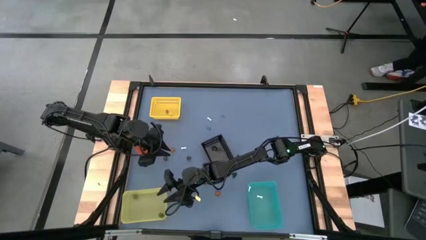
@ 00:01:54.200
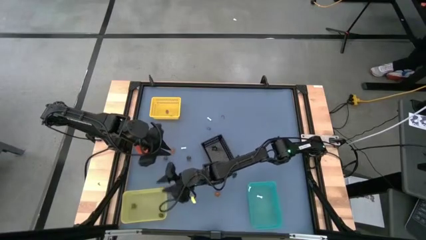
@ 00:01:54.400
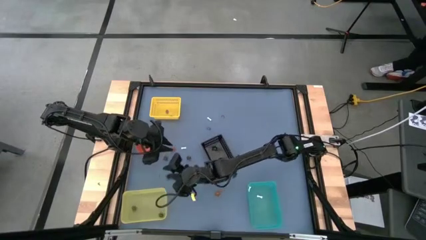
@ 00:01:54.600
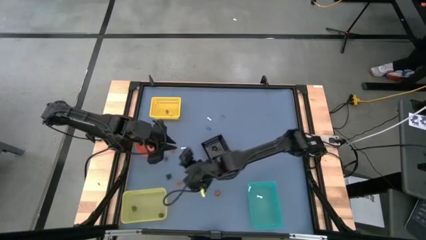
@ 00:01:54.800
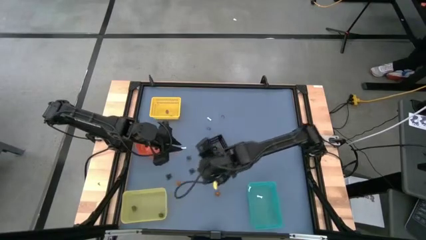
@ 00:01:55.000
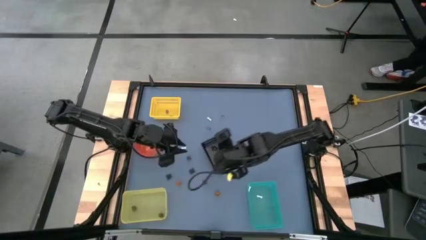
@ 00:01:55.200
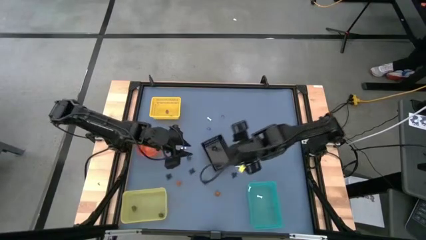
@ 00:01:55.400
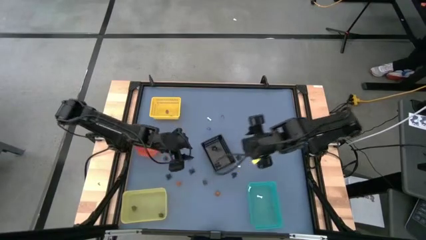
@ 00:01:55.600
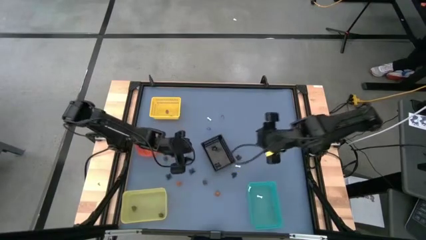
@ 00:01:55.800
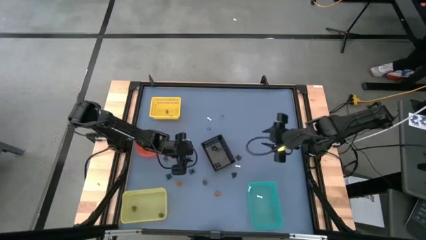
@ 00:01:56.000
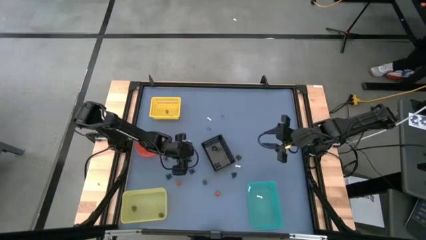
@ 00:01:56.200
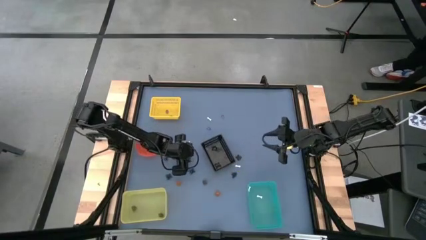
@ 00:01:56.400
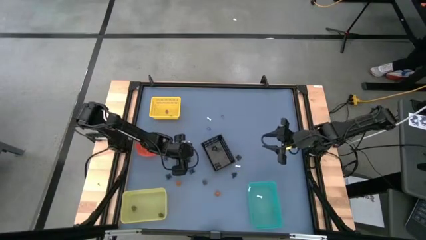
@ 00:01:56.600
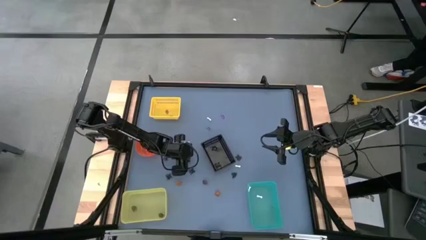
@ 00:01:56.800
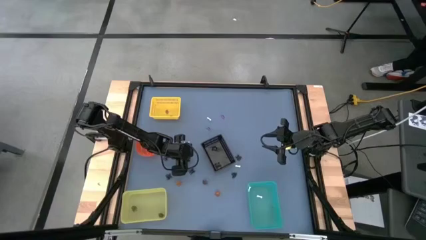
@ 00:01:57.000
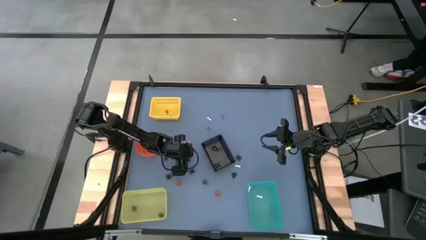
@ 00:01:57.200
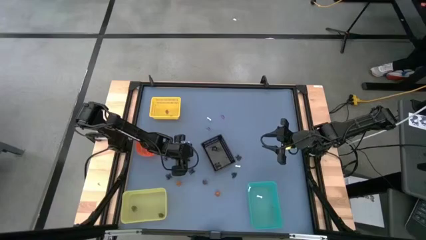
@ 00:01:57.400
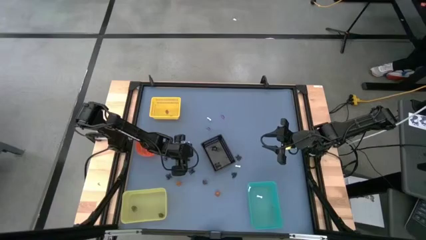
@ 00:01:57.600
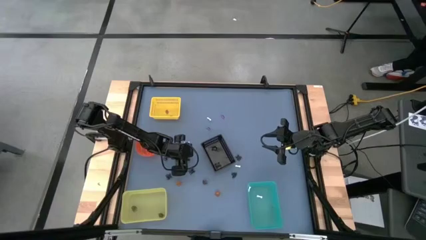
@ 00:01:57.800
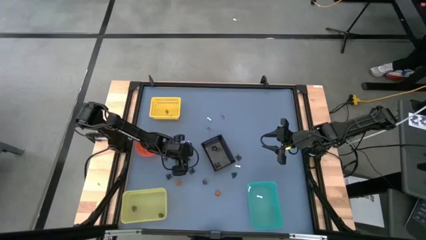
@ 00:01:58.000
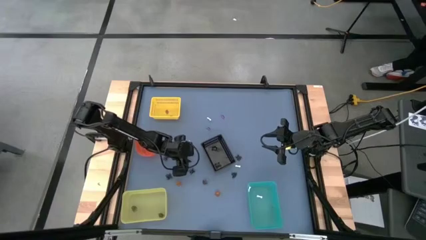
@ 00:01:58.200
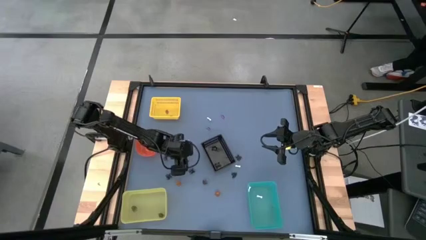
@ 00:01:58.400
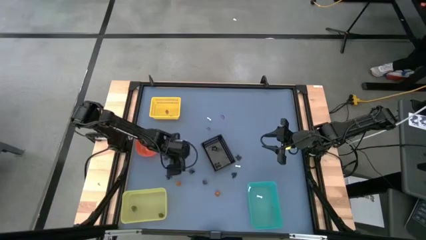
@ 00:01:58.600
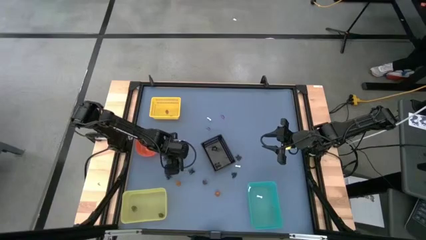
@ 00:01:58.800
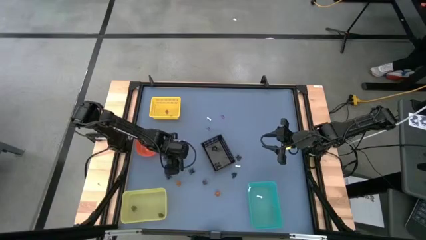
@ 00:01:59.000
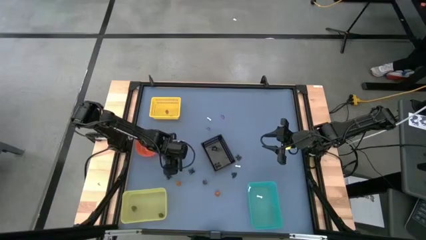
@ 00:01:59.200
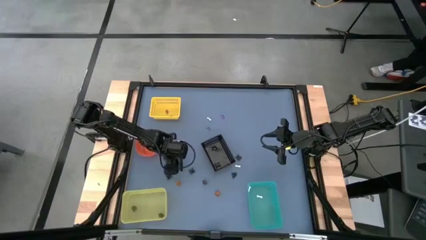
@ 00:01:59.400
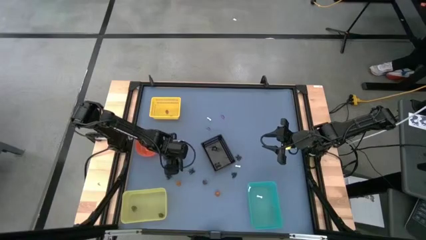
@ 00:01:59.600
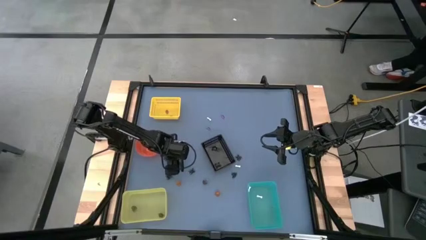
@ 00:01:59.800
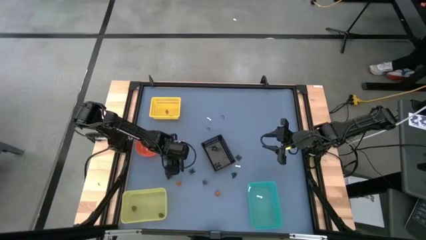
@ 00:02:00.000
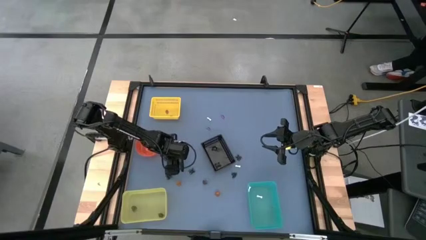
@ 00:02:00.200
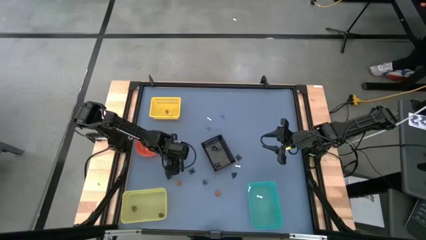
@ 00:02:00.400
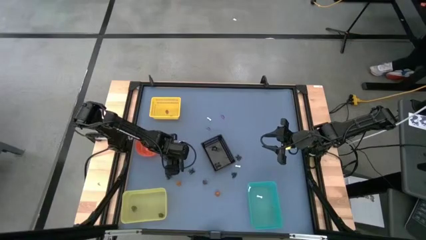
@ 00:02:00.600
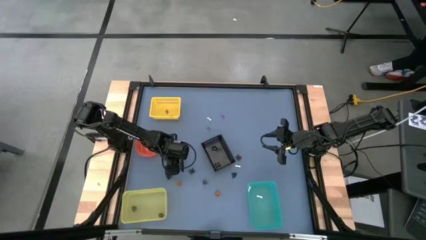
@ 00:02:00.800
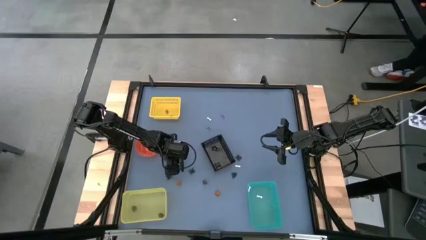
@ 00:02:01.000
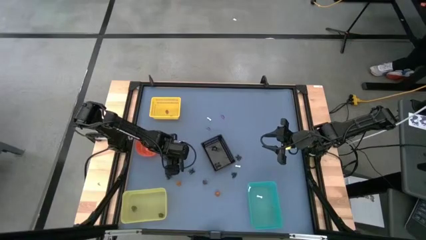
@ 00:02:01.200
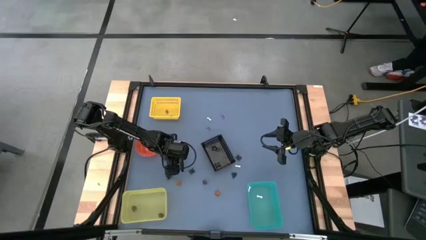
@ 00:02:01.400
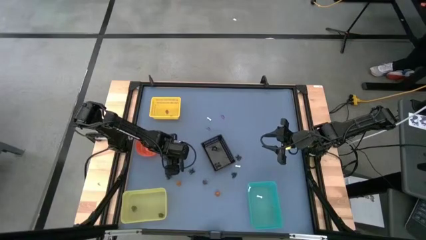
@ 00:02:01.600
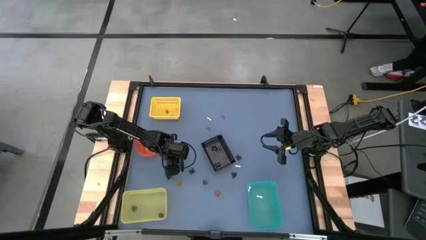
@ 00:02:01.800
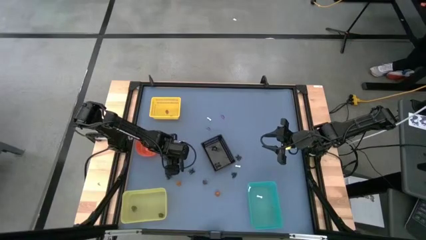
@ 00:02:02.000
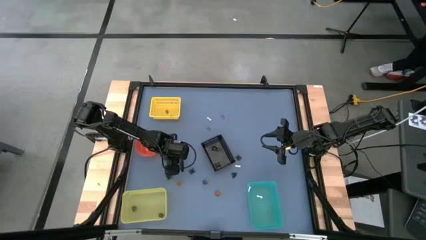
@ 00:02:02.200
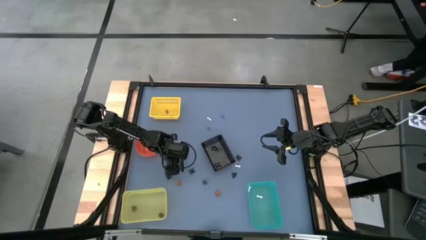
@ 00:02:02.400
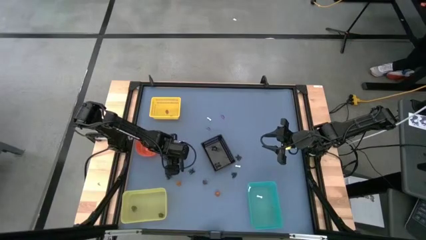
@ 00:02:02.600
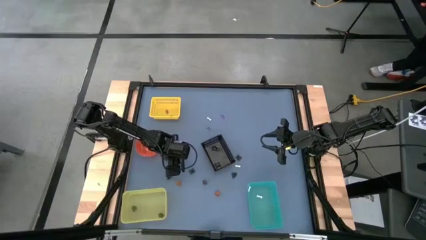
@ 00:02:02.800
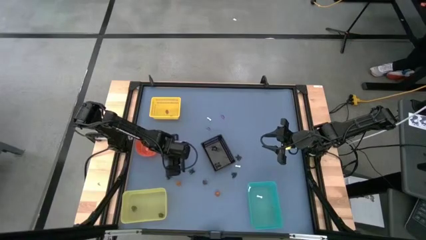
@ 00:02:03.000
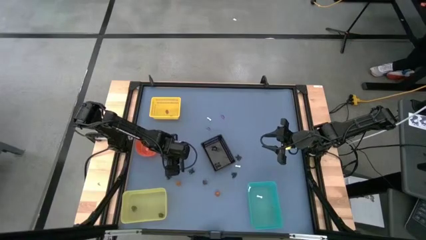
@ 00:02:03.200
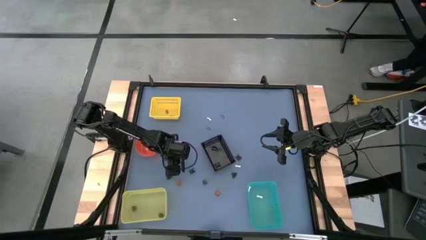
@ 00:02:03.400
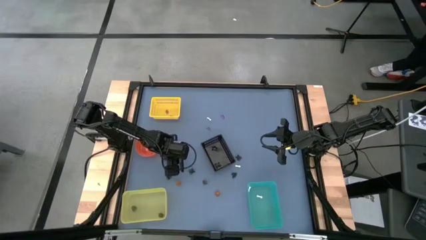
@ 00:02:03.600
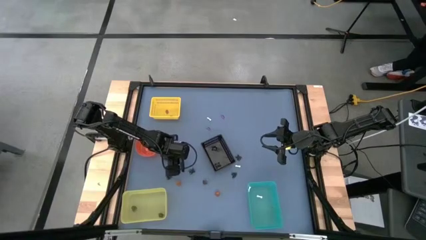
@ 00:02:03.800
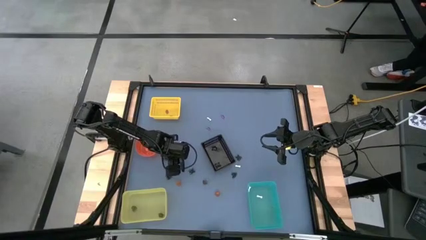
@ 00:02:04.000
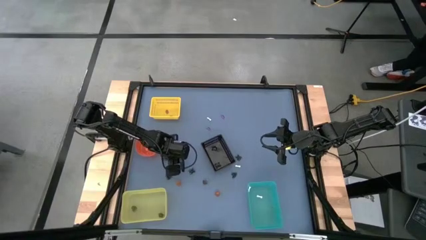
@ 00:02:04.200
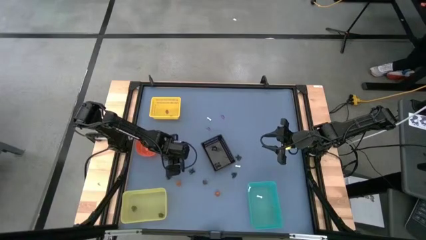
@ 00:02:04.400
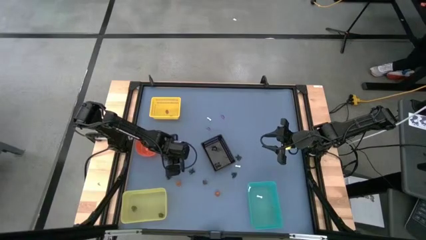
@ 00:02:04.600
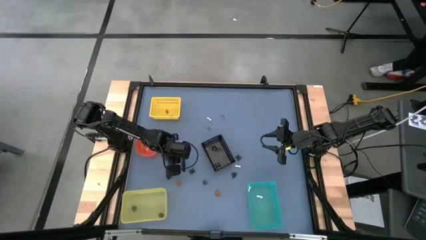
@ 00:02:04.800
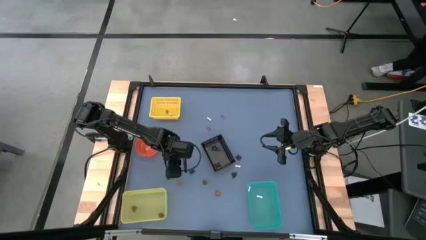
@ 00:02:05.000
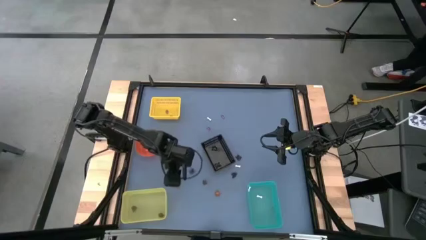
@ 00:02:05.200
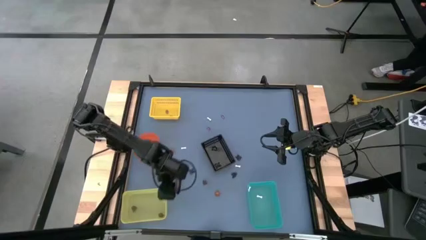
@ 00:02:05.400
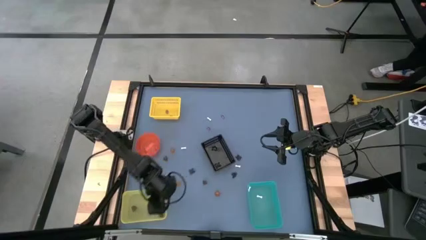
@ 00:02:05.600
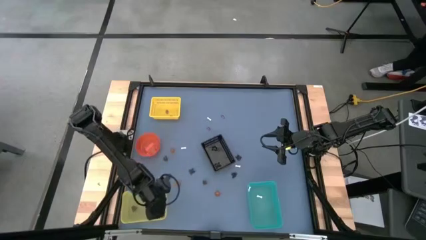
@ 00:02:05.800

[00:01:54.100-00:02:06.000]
Task: Sort Halloween decoration
Put the black skull toy into the bottom yellow bin

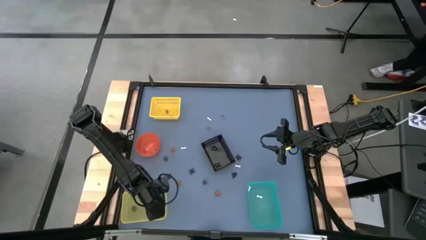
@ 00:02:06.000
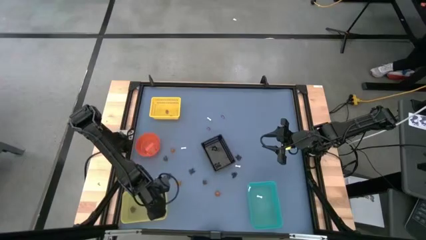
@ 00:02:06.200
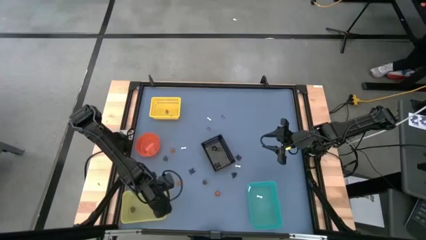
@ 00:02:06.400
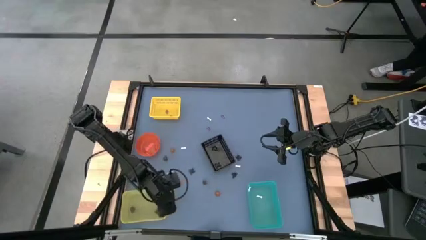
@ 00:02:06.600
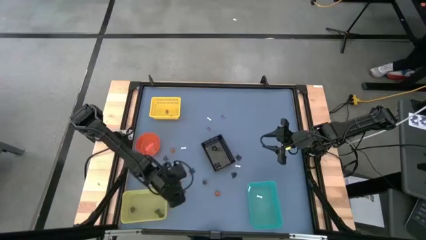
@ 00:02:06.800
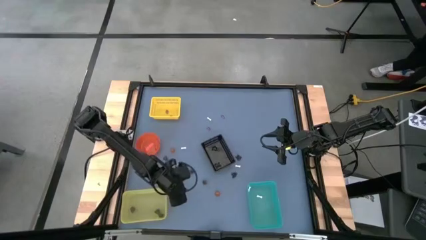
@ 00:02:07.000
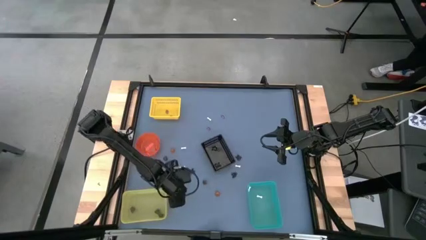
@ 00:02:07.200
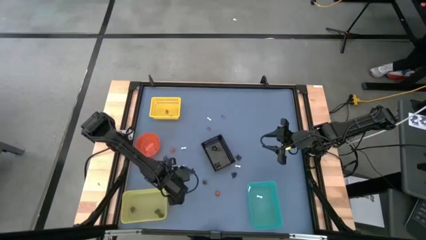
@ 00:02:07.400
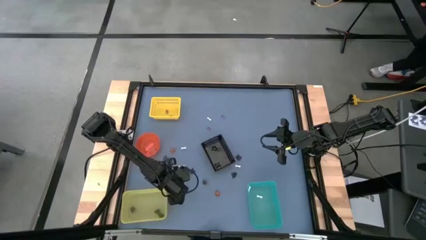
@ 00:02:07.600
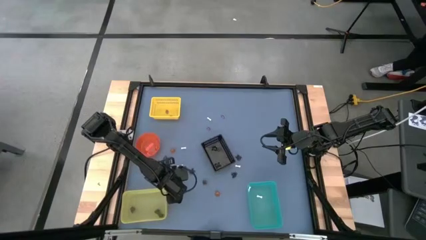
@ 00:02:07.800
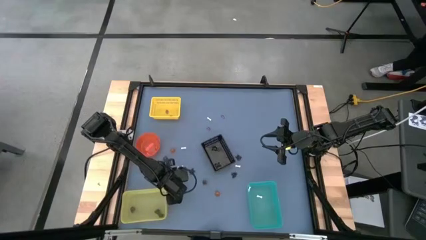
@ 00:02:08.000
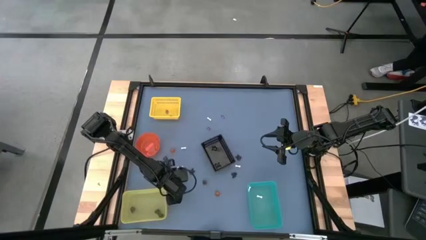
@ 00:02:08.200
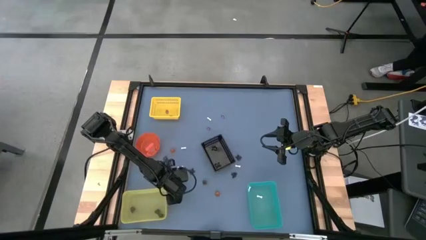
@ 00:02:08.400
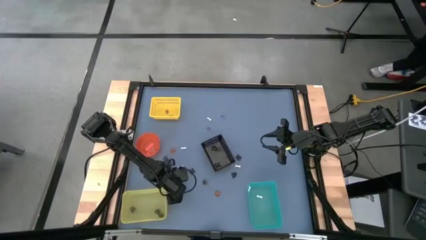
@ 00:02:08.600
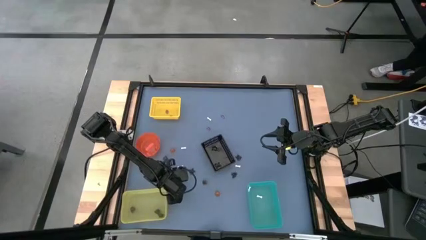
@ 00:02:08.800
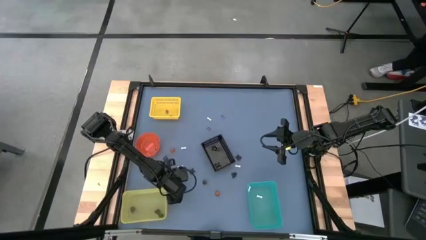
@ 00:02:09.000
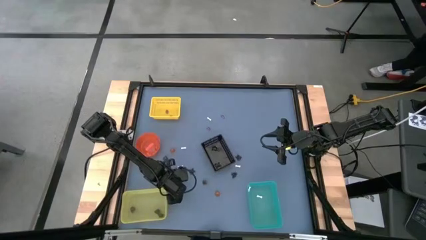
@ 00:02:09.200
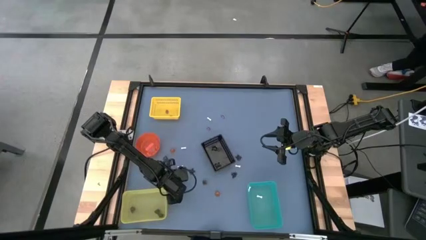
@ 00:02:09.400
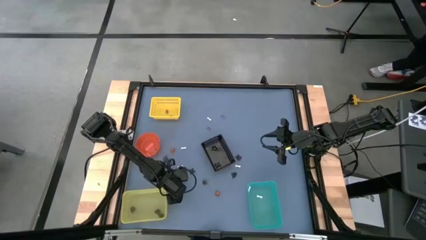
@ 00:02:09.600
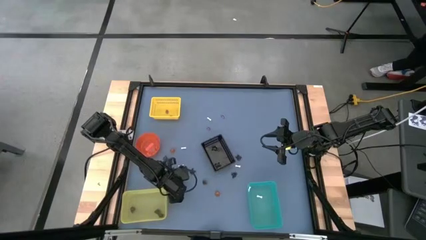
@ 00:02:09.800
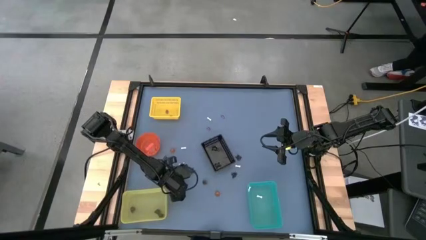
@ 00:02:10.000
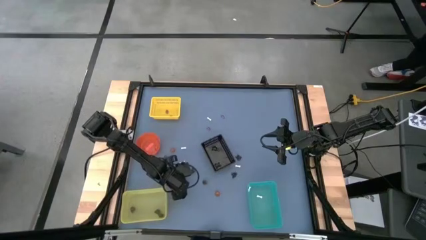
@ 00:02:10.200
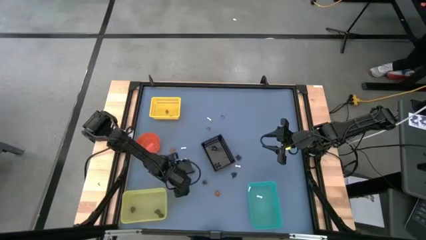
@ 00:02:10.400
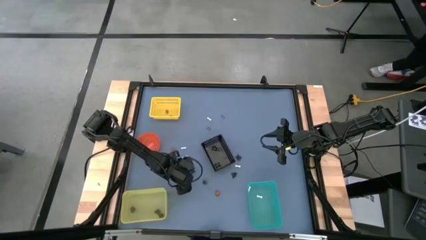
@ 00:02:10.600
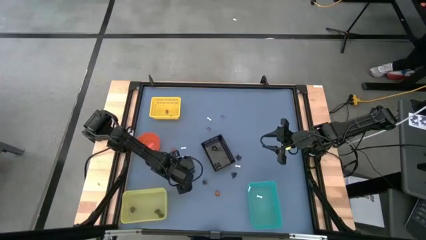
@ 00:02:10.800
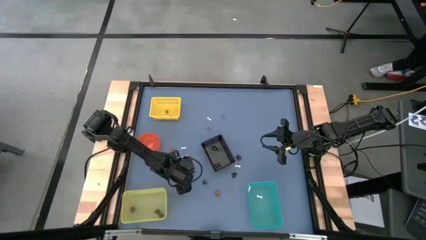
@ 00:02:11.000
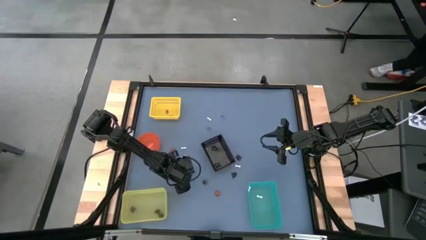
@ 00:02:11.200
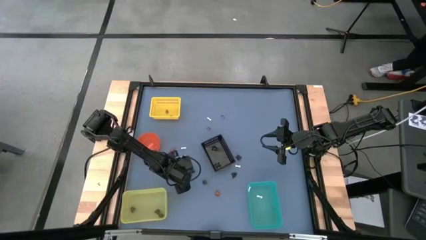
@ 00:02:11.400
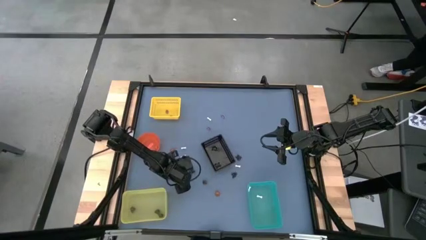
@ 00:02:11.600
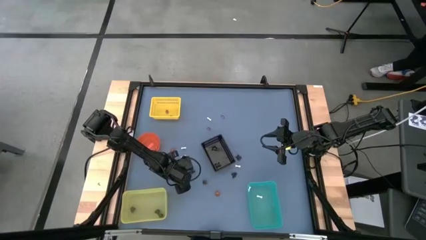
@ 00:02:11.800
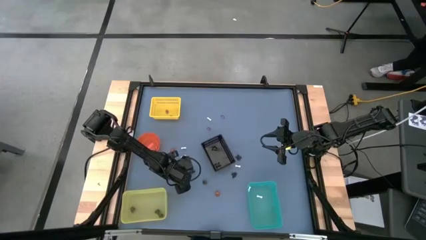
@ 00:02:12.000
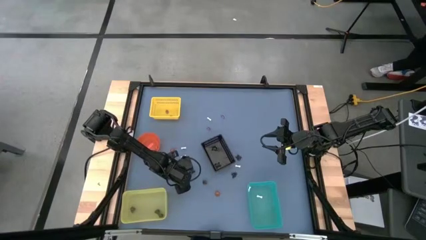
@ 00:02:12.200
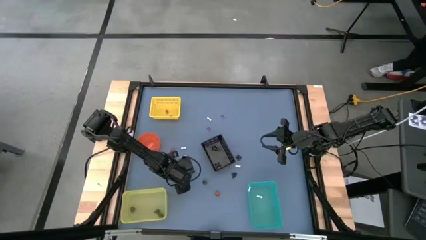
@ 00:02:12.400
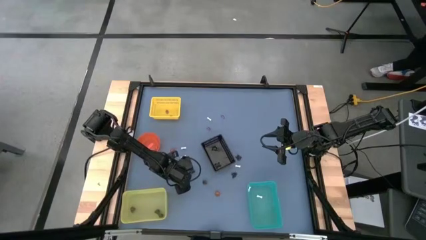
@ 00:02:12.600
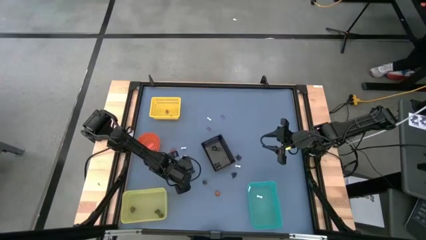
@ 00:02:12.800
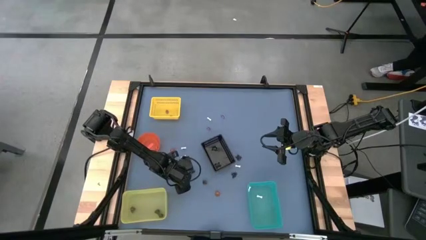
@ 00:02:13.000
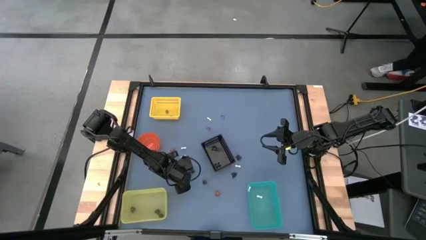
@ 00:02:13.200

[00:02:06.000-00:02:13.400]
Put the orange pumpkin toy into the orange bin
